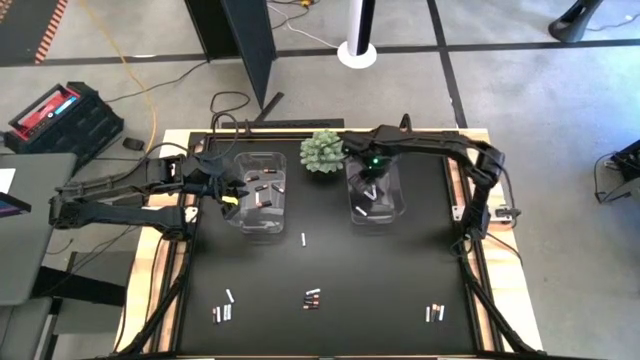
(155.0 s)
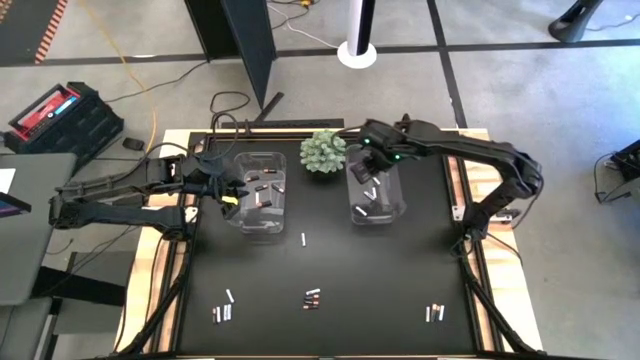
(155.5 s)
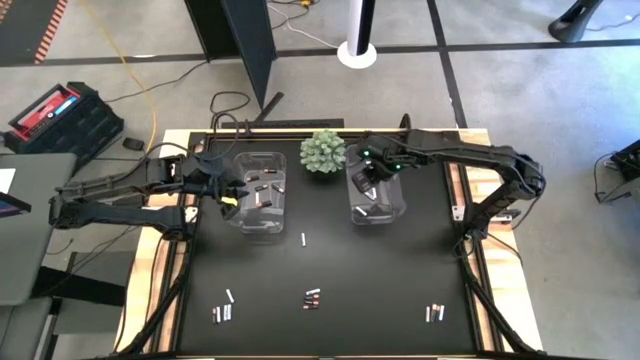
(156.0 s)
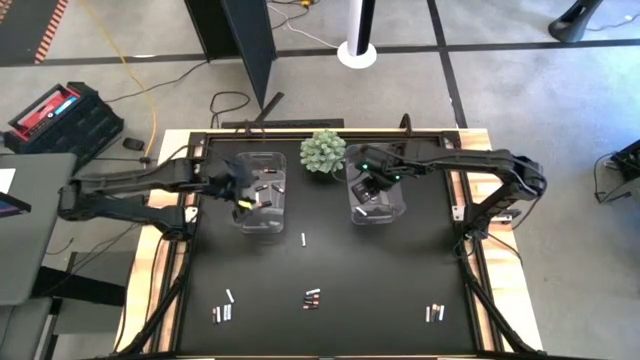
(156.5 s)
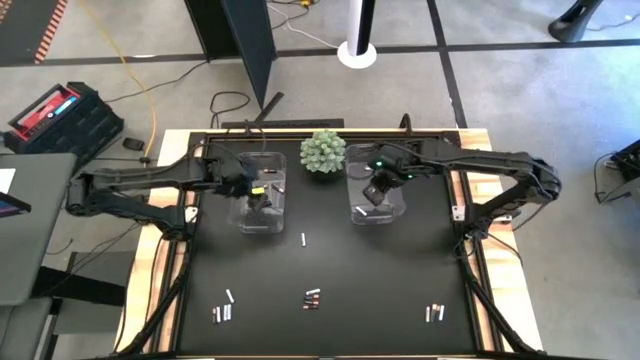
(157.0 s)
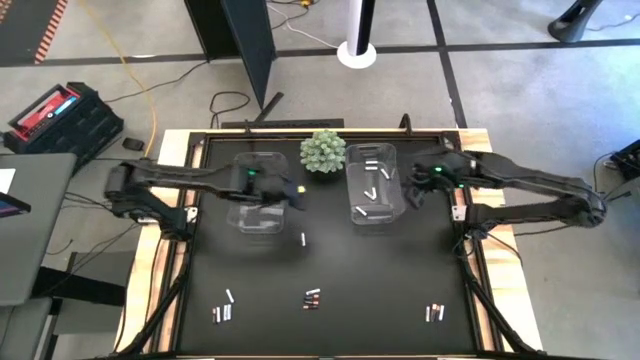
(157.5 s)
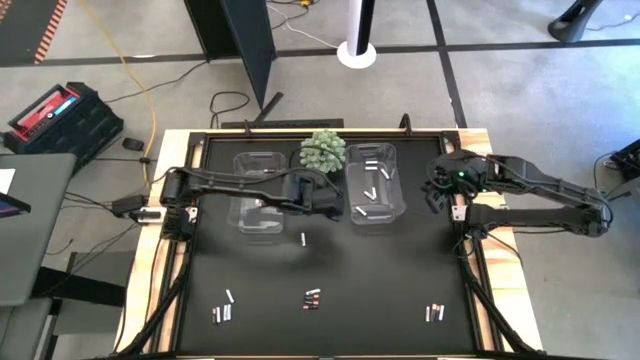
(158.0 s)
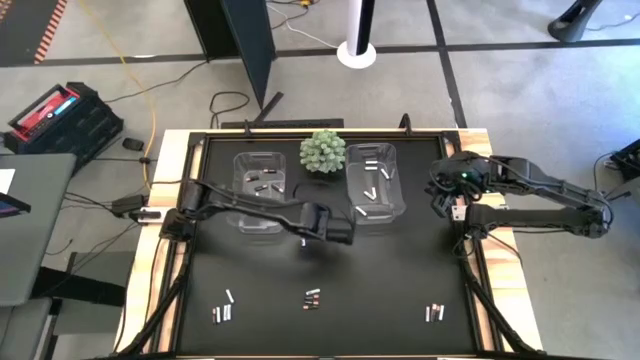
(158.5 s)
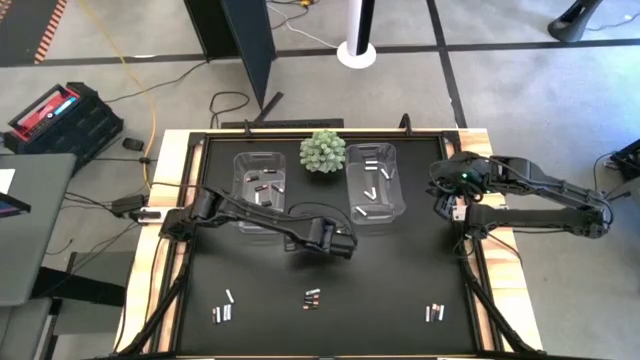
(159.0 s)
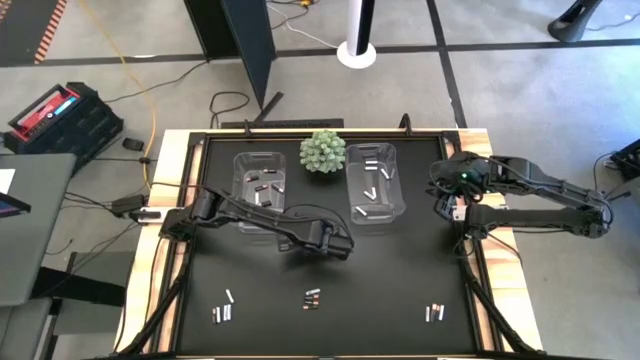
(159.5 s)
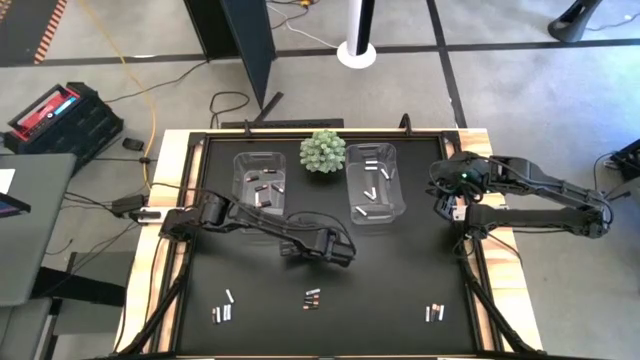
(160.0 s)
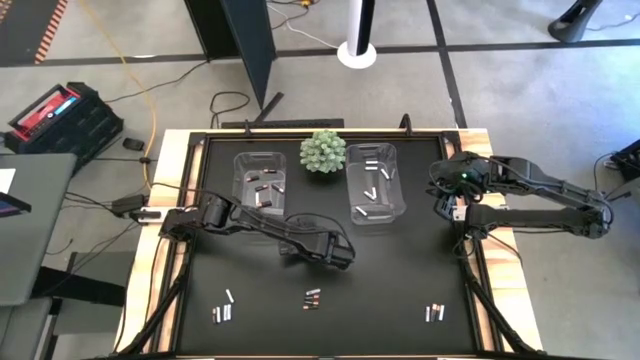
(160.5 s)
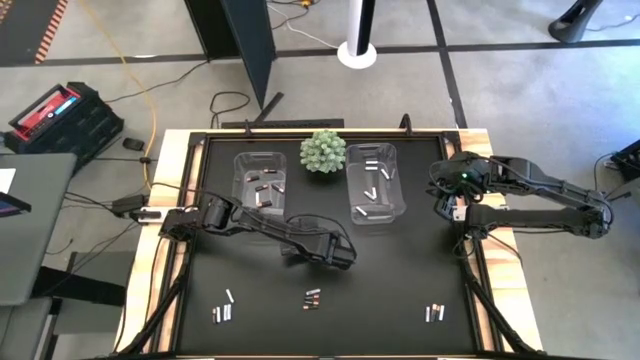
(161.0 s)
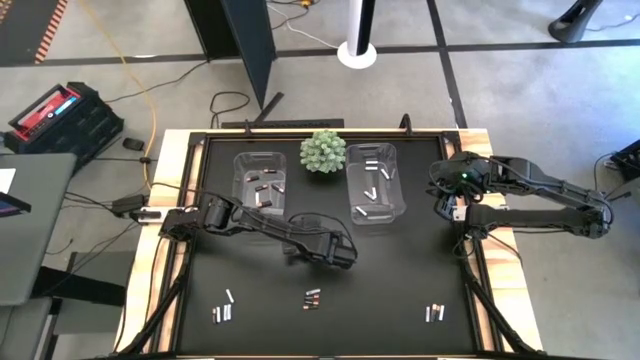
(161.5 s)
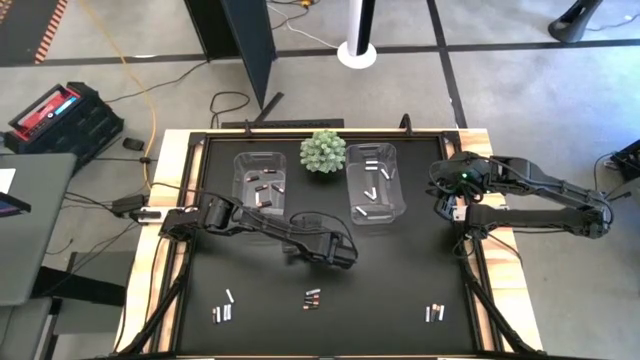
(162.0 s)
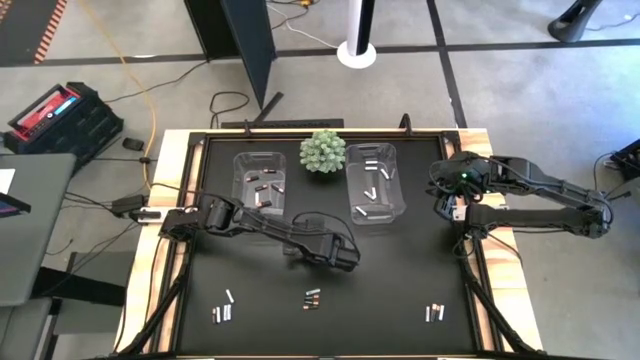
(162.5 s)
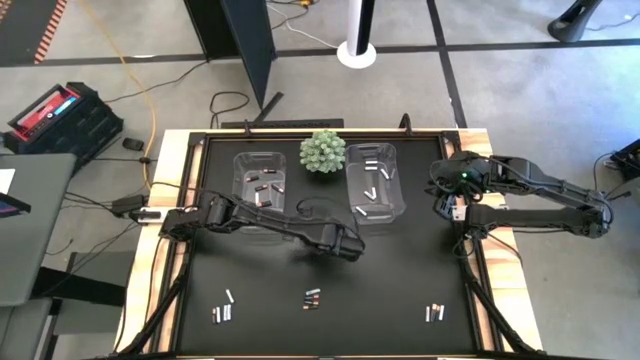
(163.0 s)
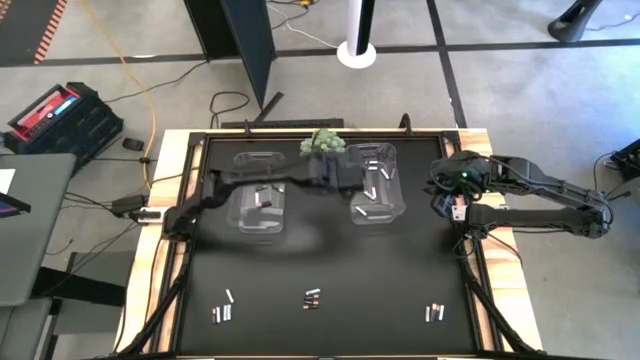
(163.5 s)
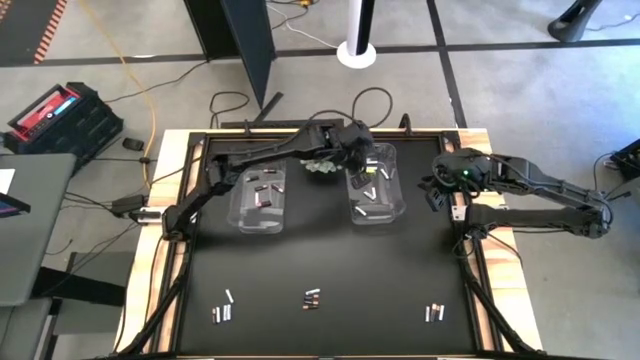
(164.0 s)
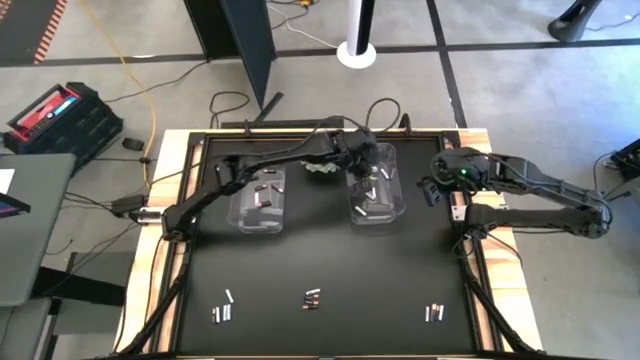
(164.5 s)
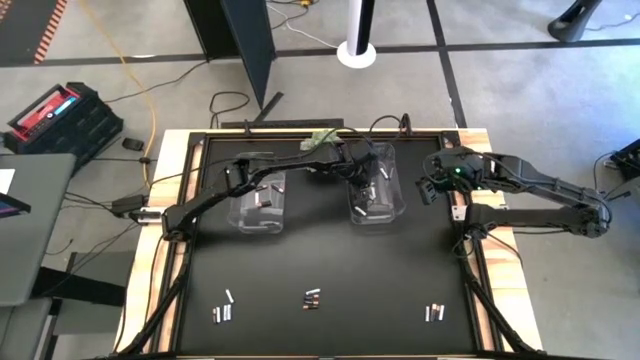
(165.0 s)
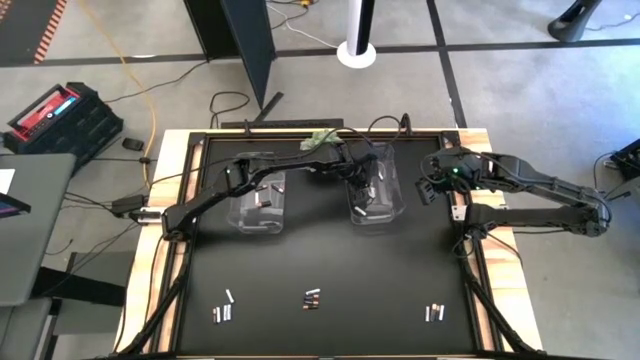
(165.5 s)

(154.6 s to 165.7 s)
Task: Sort batteries
Put the white-blue battery into the right transparent bin

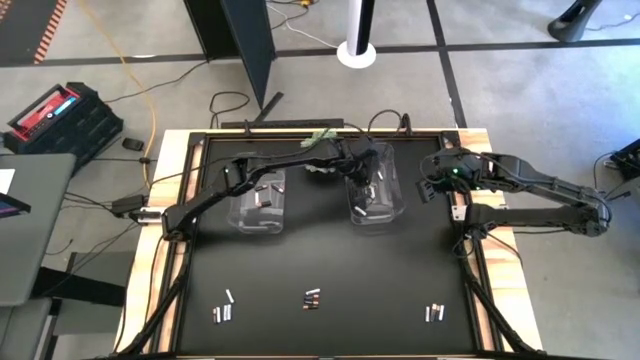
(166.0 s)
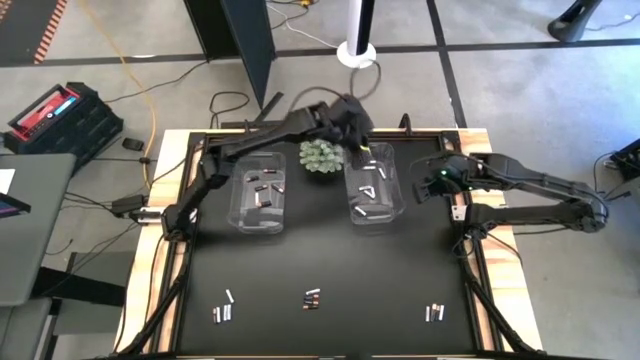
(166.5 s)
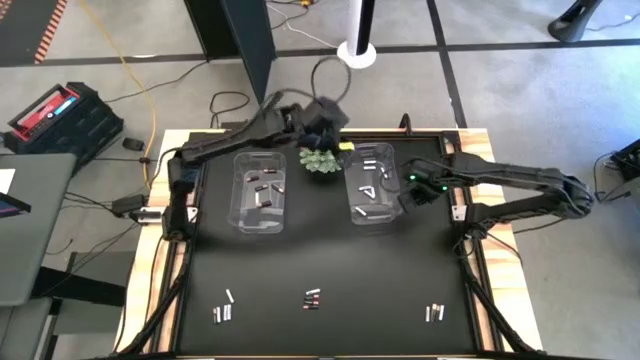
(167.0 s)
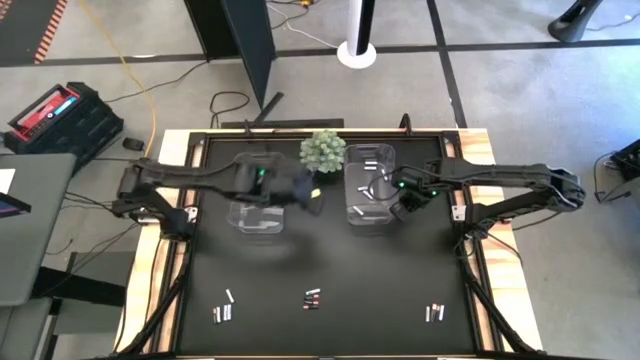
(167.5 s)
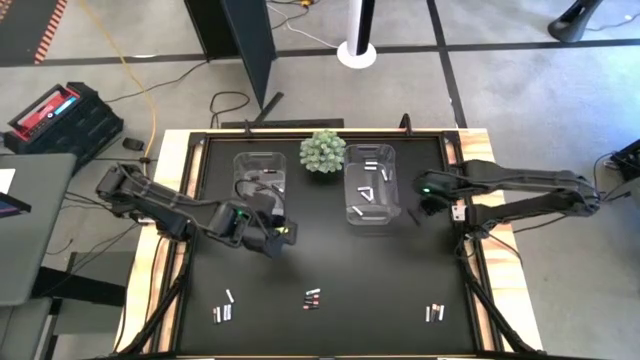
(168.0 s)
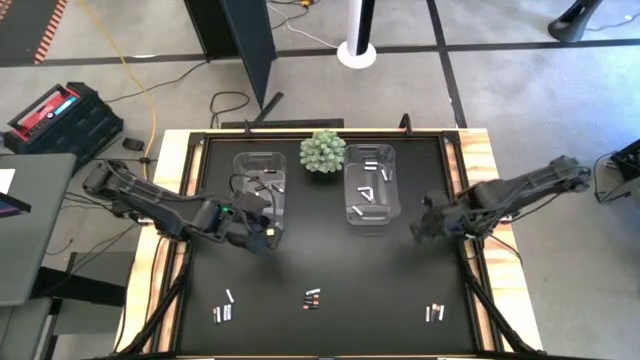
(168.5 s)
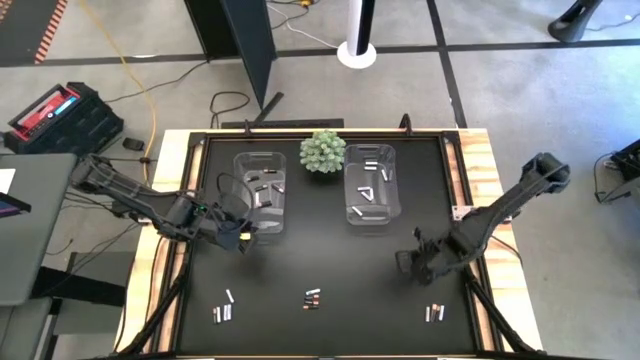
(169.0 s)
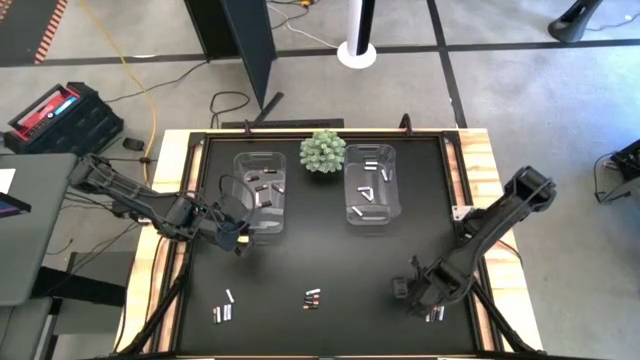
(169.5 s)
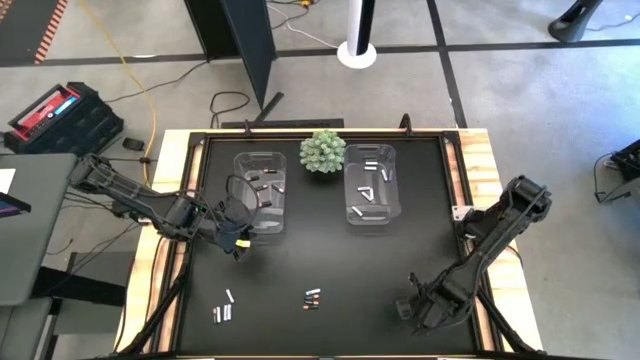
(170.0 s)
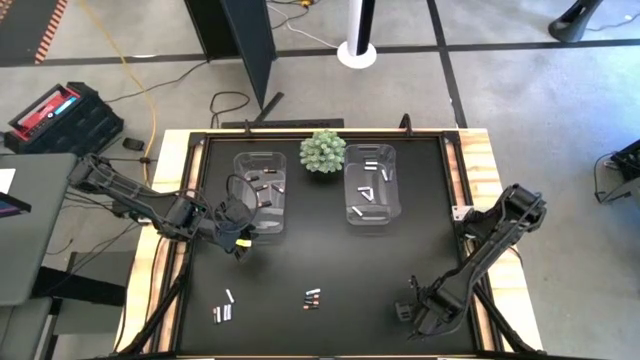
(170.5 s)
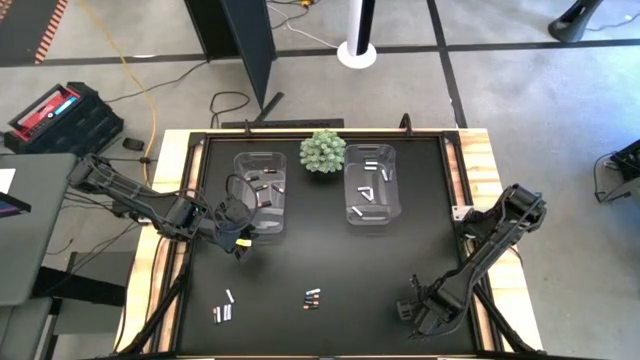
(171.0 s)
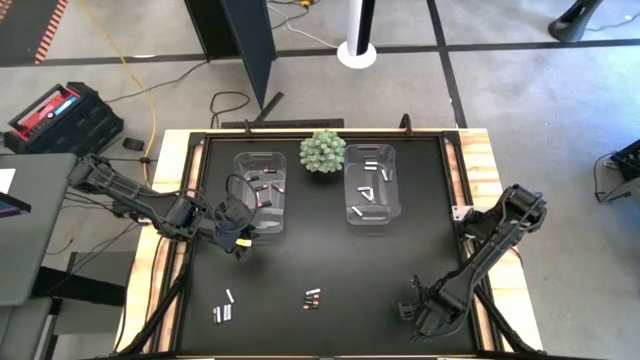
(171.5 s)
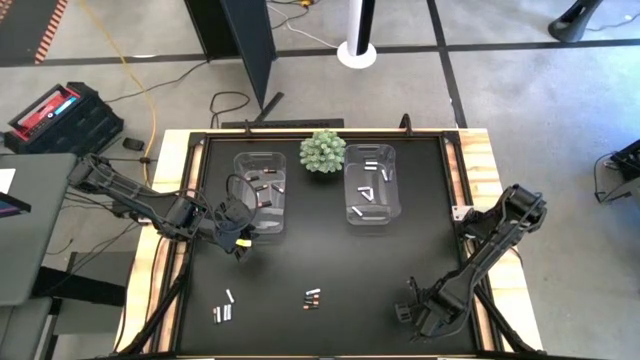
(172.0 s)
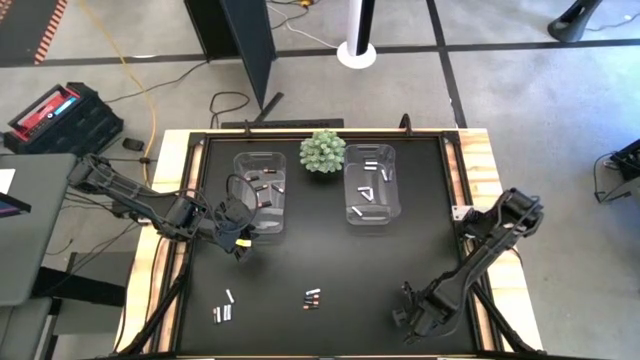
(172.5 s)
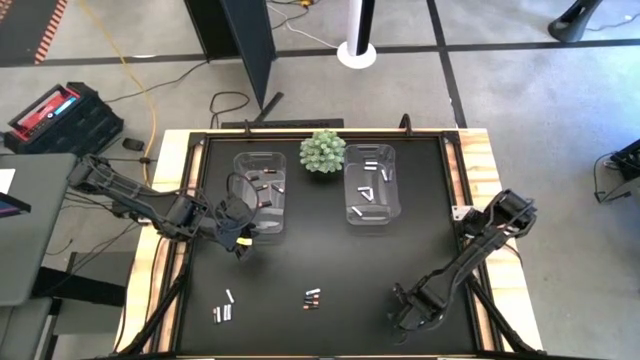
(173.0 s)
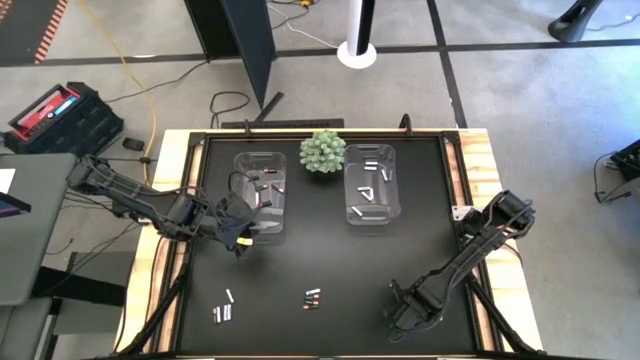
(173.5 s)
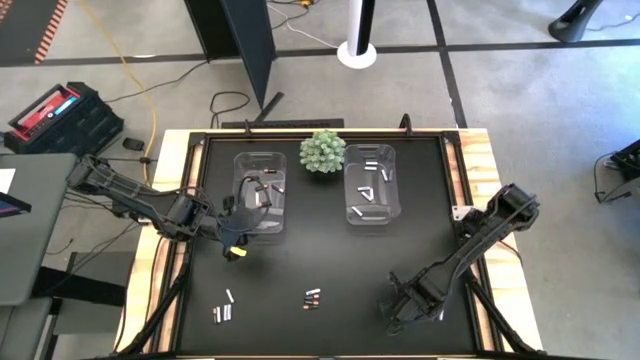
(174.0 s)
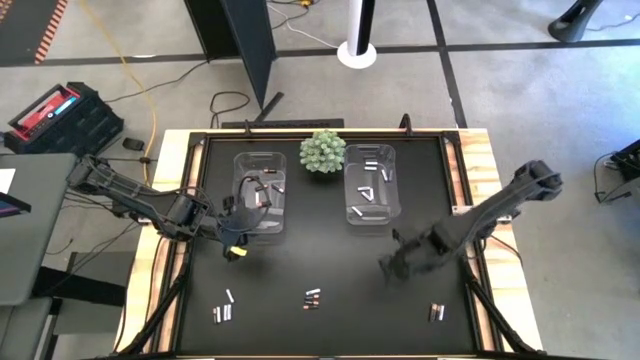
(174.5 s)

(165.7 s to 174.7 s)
Put the white-blue battery into the right transparent bin
